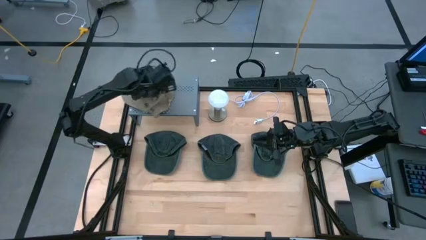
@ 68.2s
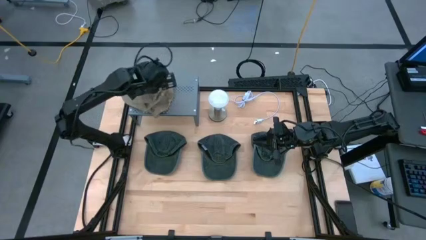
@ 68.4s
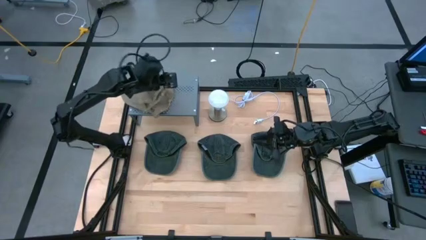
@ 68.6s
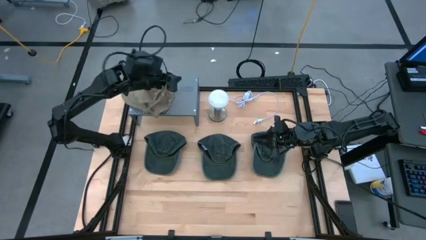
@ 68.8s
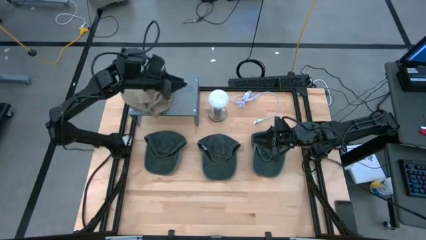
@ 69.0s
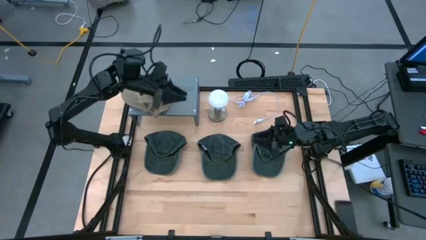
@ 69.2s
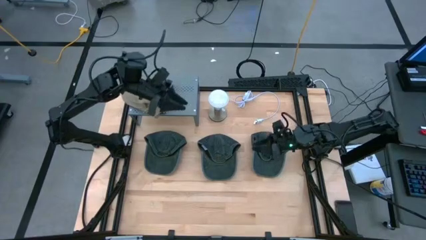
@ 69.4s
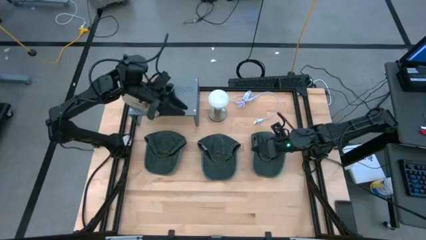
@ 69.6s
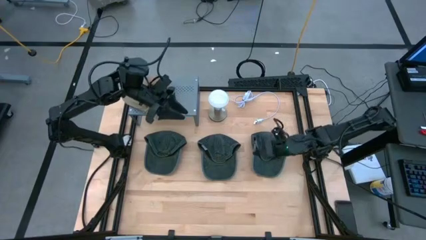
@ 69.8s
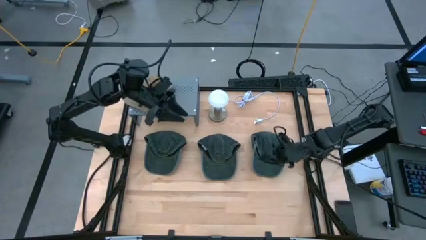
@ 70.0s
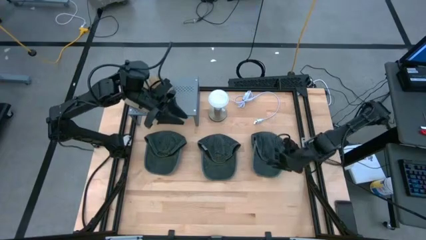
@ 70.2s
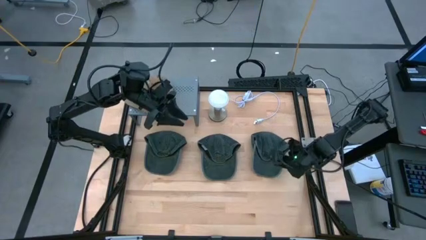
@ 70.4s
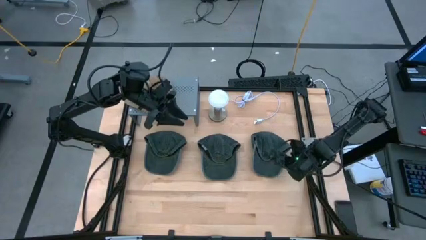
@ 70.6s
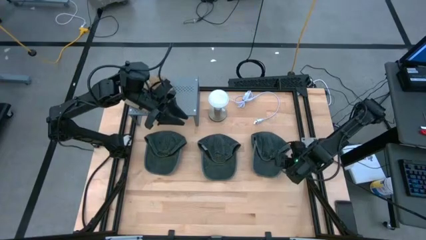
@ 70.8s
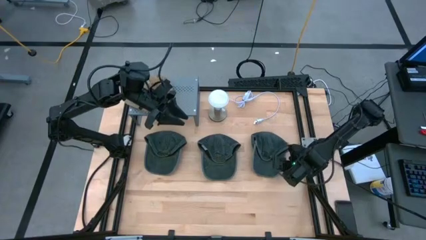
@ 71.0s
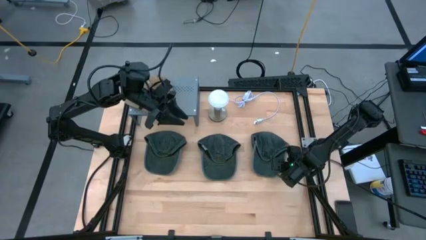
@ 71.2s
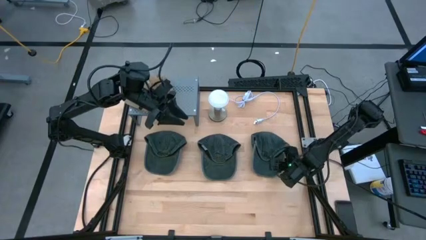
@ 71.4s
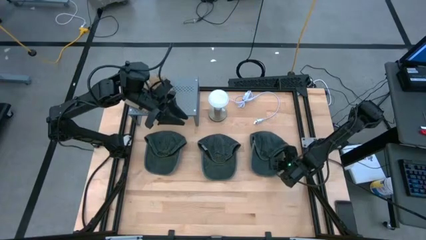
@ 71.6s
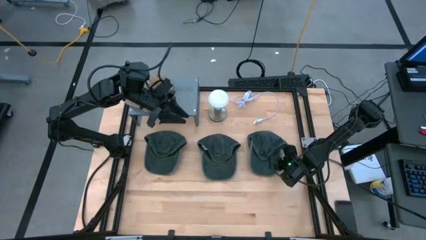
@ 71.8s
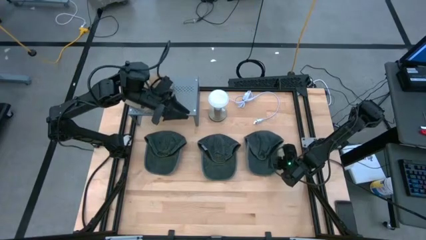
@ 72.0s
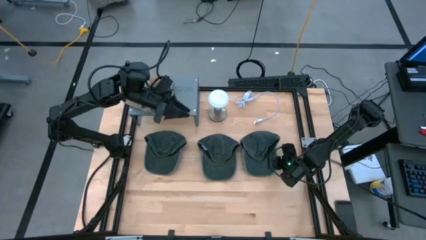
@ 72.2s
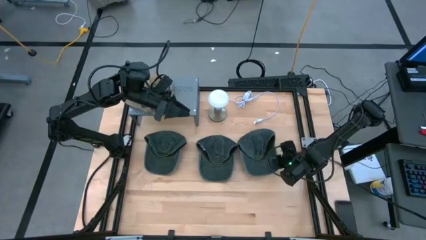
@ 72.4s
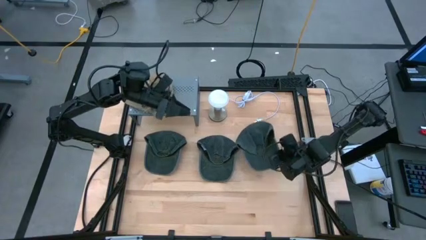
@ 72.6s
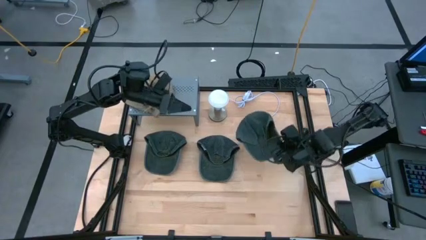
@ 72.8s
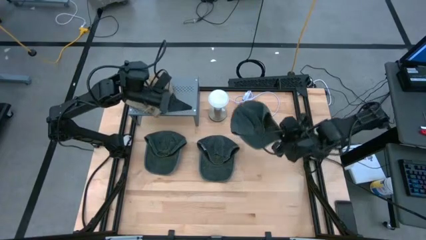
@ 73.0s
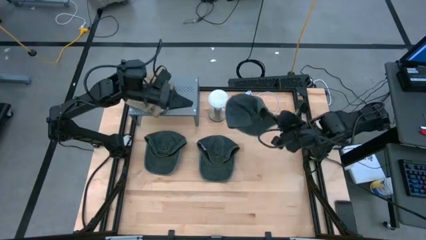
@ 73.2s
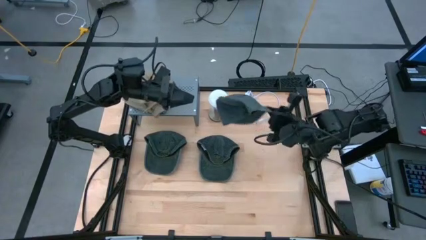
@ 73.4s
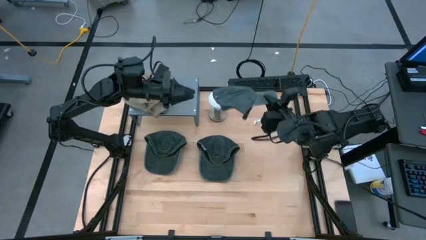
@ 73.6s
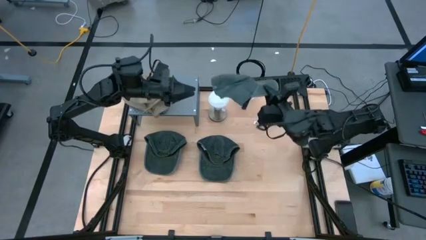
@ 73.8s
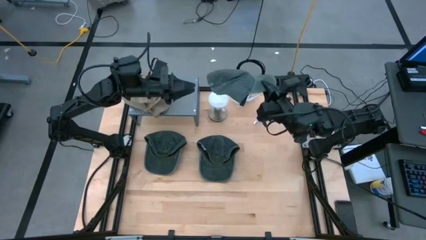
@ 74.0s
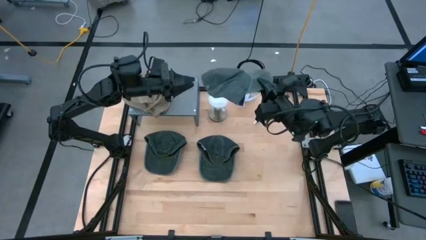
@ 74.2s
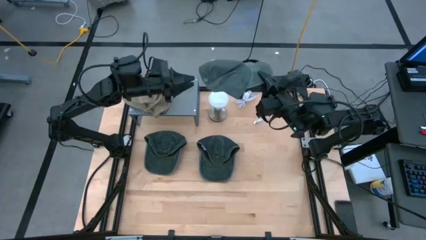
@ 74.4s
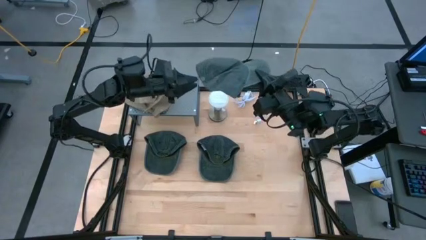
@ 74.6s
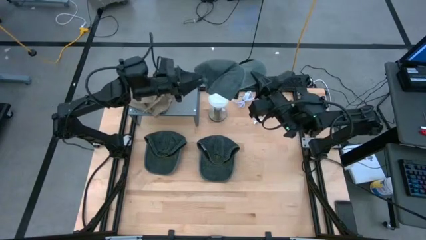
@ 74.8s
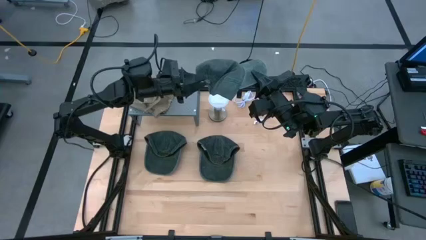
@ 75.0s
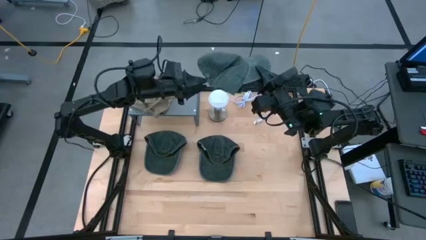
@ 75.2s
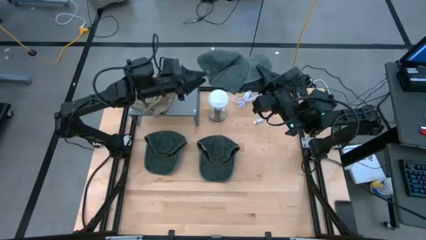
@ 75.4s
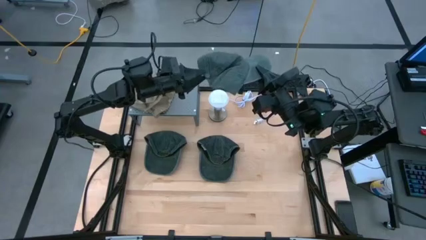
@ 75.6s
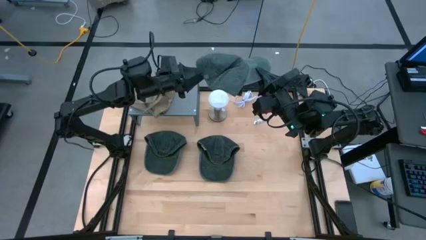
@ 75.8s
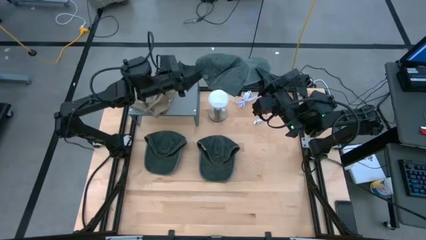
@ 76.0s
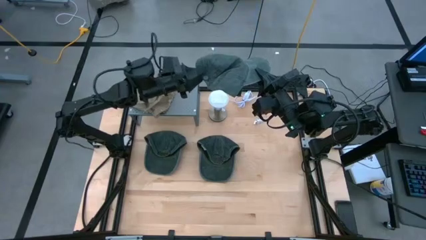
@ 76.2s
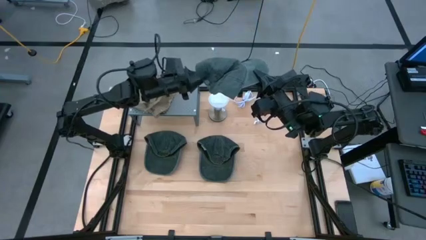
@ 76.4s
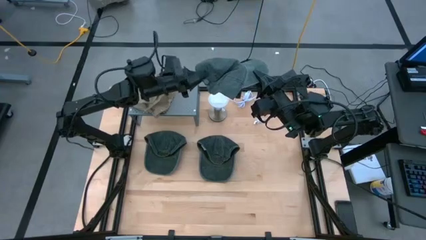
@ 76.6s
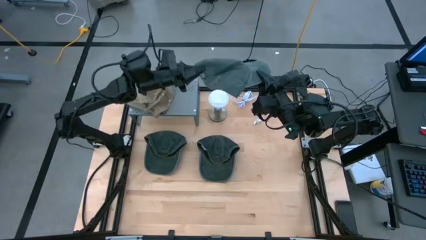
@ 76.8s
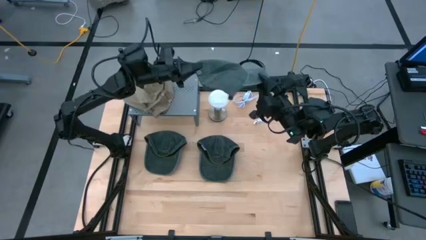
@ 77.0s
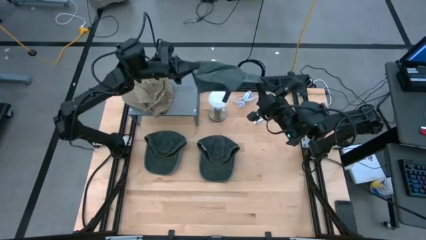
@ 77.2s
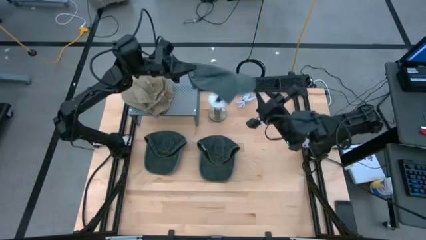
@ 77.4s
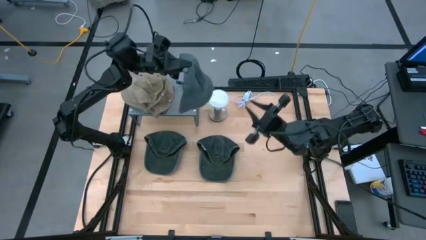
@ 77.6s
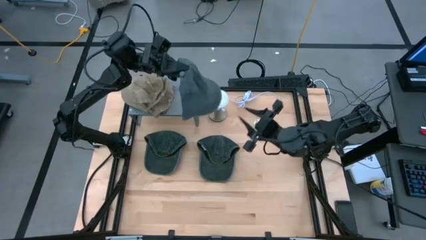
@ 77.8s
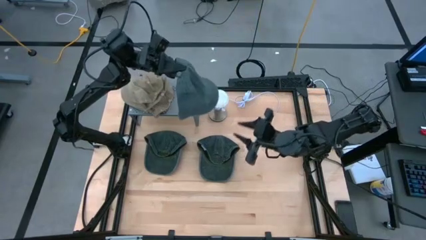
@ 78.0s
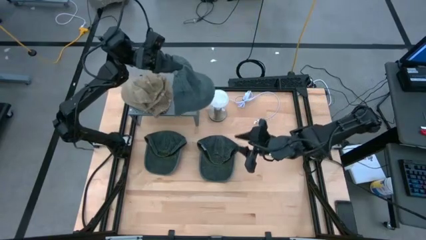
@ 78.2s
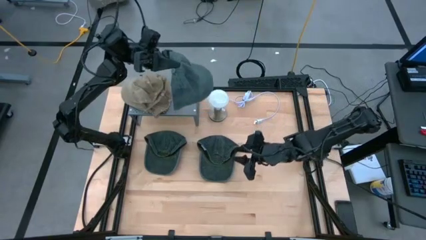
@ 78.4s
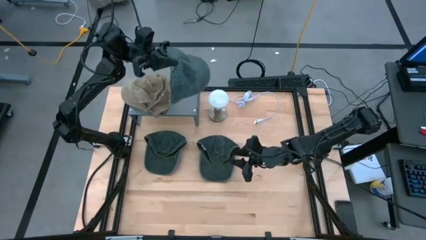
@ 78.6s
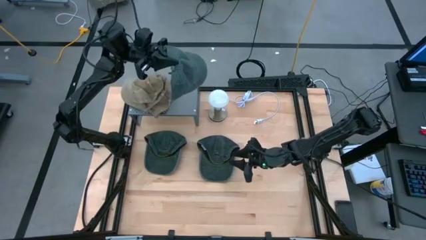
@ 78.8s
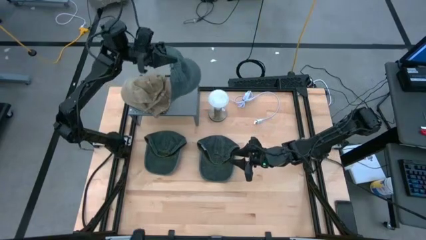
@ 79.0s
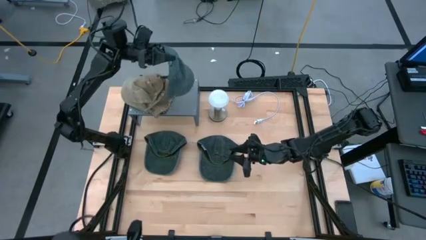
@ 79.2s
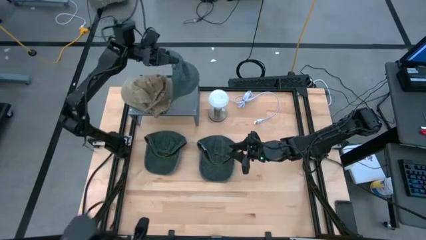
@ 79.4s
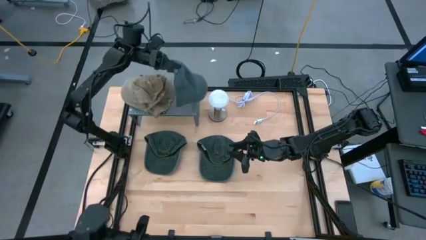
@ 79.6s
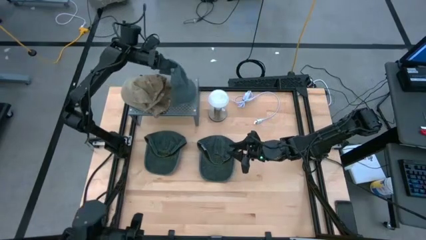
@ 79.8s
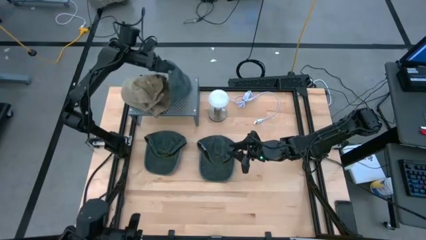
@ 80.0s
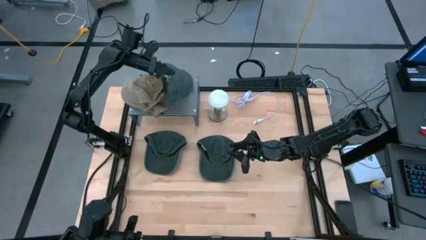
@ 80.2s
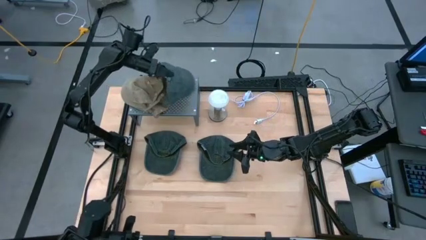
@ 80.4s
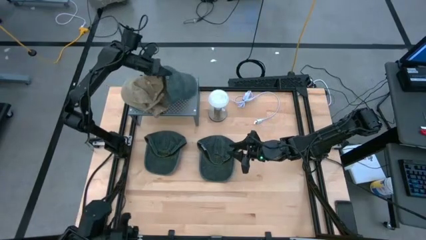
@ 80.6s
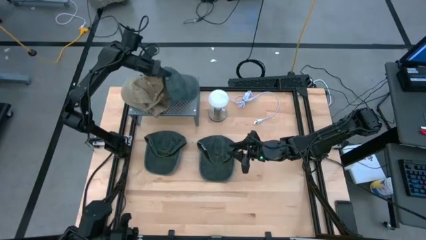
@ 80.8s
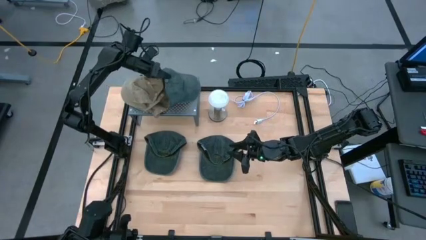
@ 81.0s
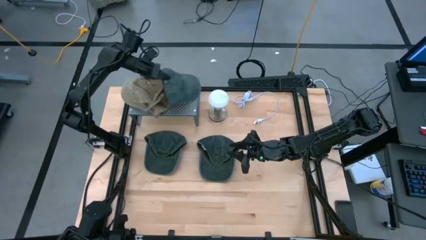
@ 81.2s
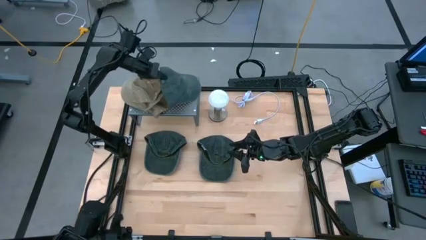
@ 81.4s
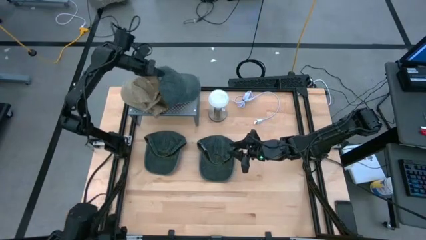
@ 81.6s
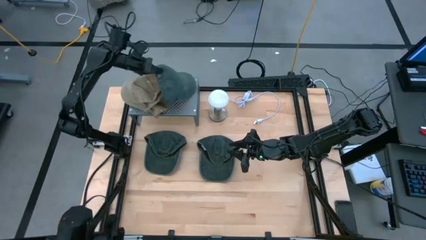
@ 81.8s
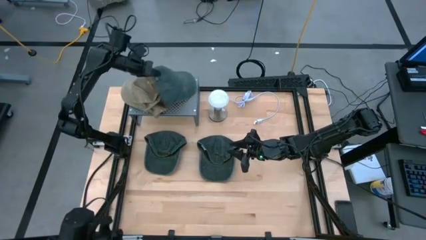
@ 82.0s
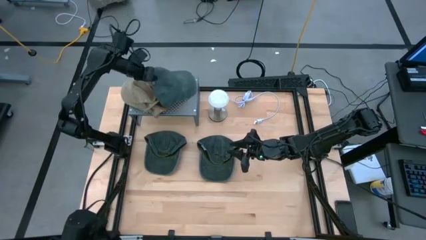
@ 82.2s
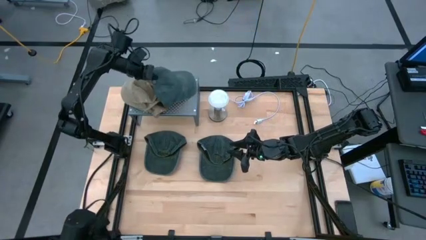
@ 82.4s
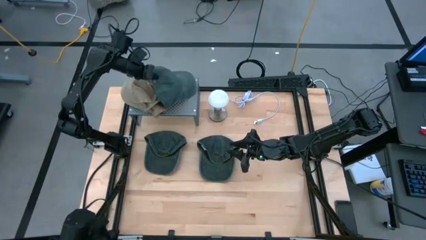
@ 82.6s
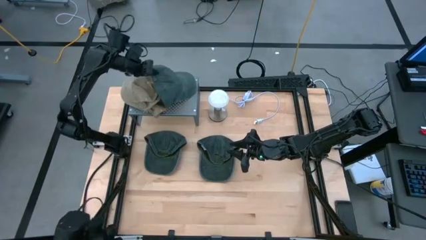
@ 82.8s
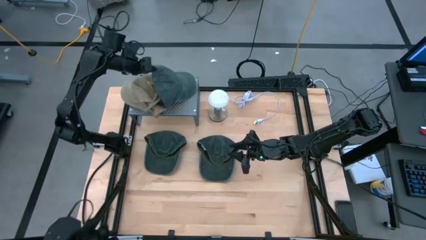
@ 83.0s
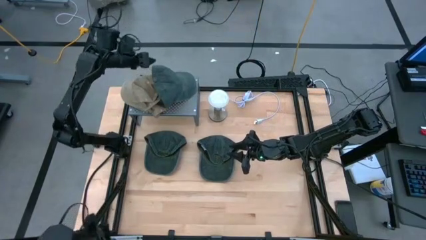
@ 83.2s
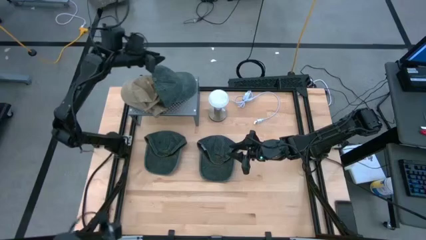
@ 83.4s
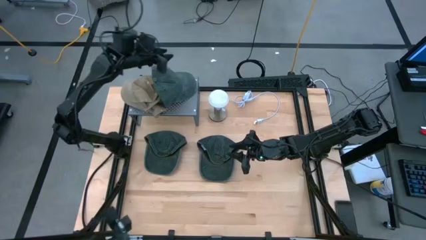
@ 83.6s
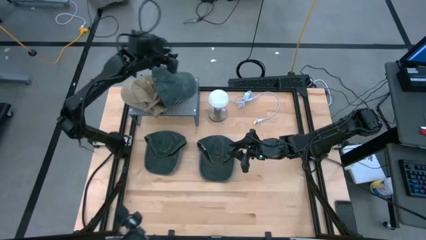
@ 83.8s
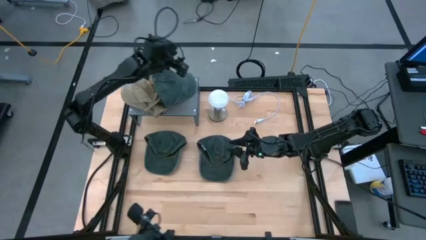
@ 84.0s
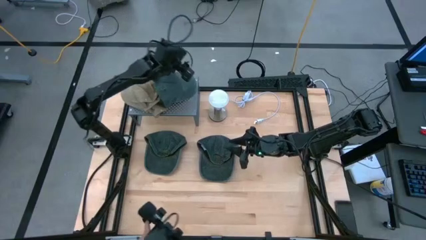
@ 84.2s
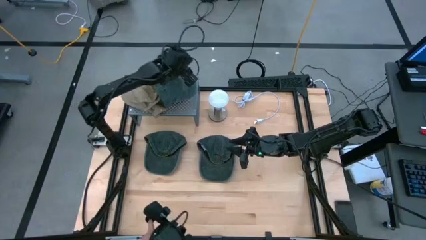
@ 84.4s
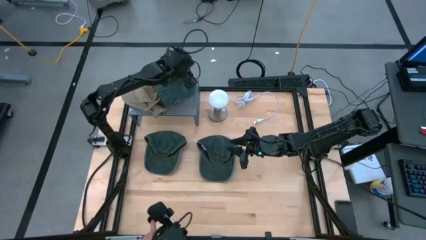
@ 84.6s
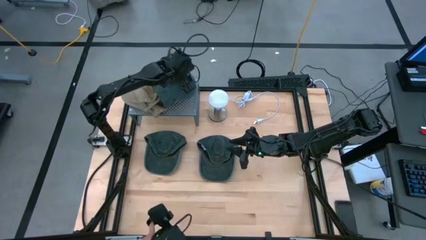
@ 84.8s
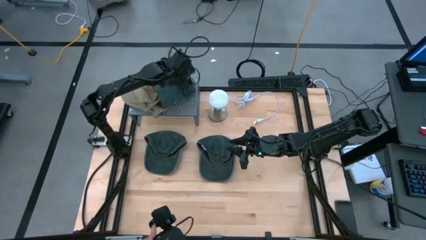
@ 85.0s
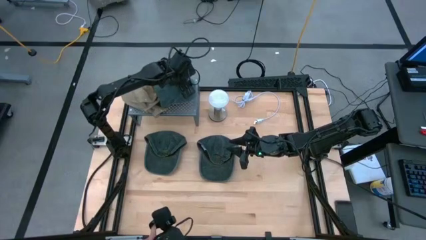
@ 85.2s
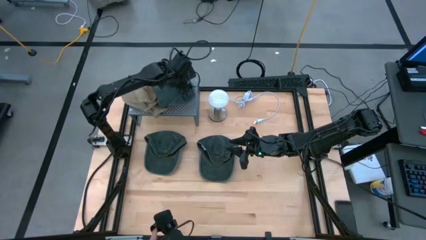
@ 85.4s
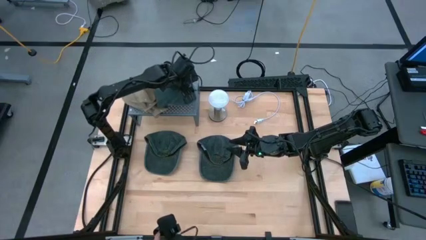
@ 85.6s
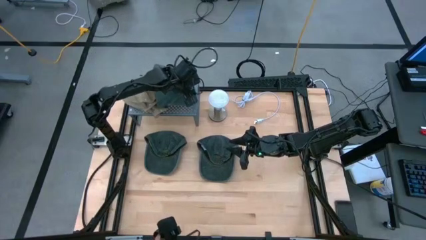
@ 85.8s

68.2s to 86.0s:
Task: Pick & Place hat
Put the right black cap on the shelf
